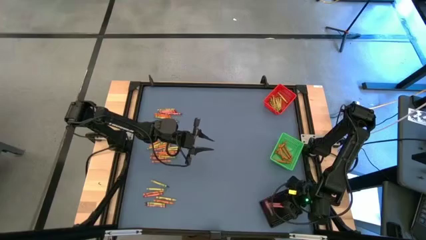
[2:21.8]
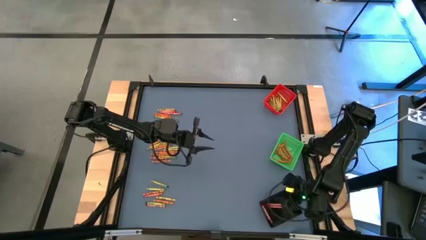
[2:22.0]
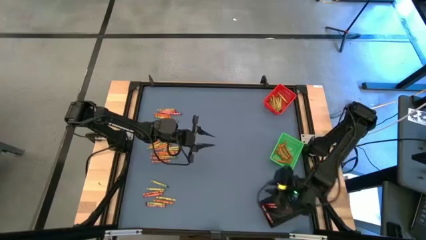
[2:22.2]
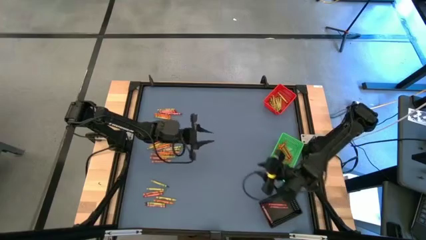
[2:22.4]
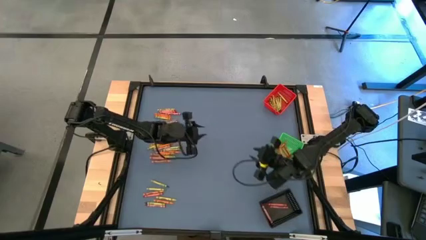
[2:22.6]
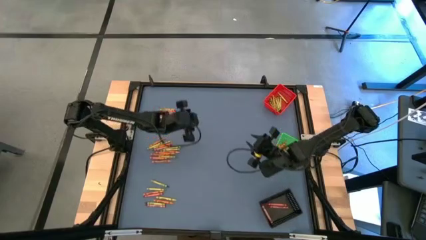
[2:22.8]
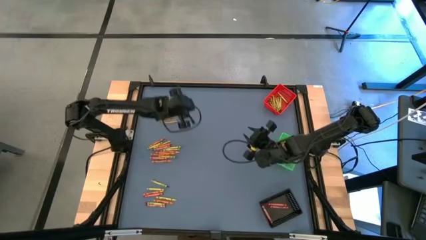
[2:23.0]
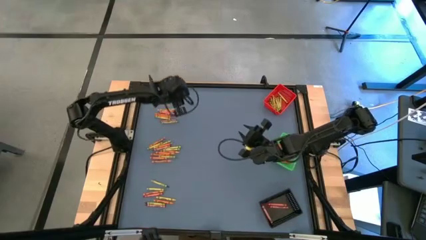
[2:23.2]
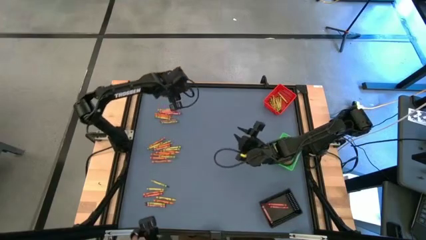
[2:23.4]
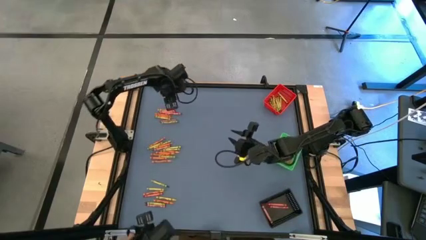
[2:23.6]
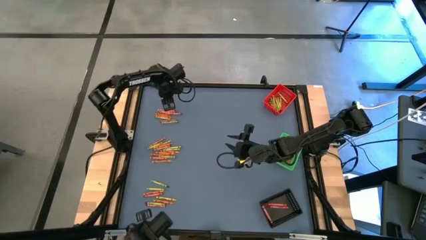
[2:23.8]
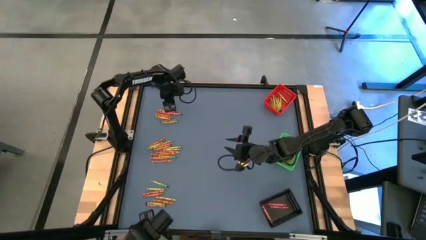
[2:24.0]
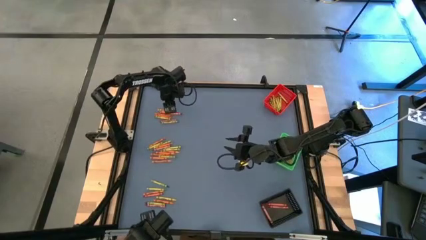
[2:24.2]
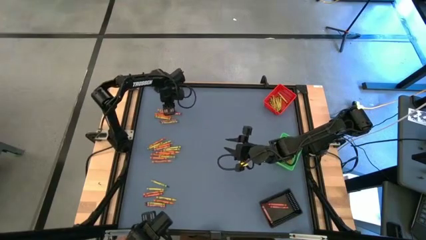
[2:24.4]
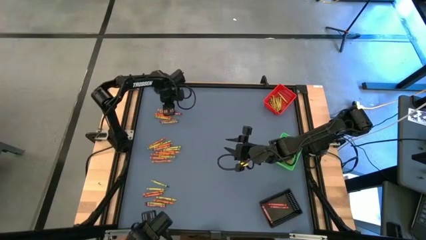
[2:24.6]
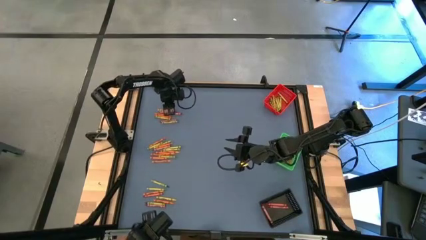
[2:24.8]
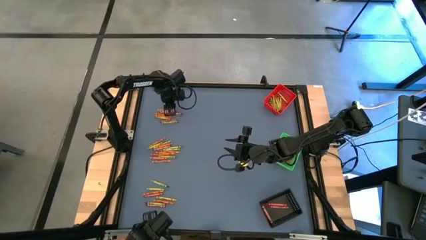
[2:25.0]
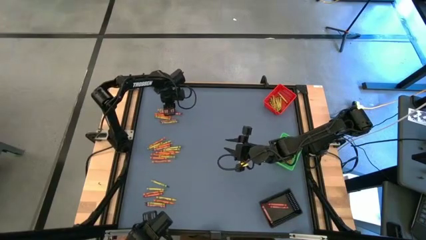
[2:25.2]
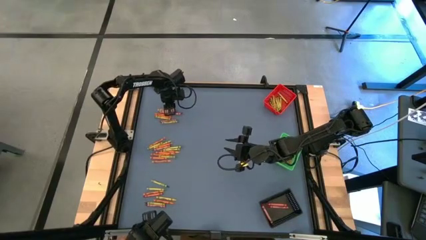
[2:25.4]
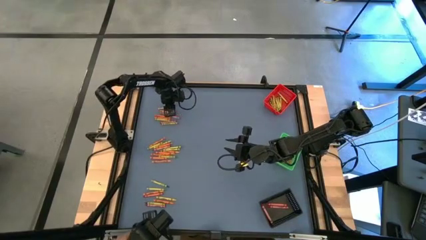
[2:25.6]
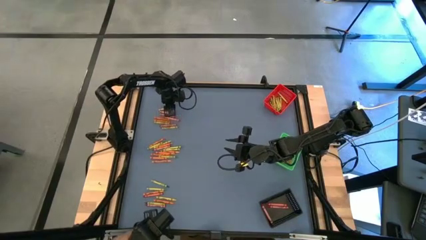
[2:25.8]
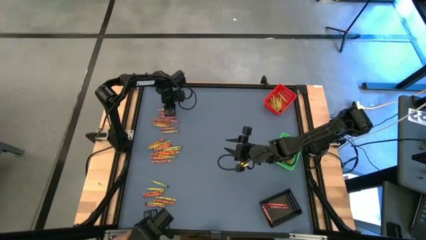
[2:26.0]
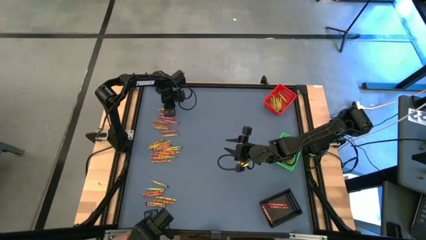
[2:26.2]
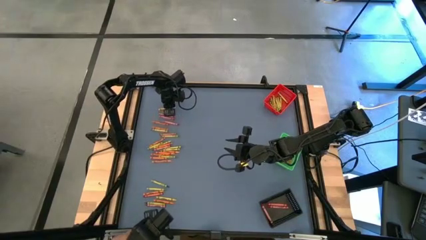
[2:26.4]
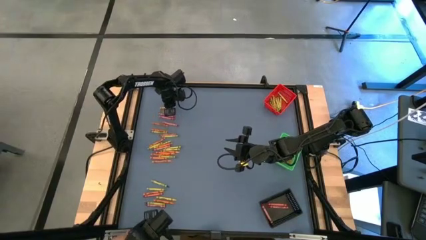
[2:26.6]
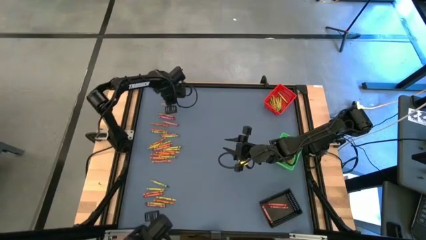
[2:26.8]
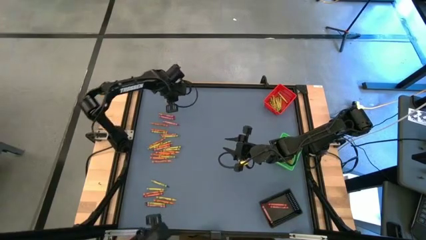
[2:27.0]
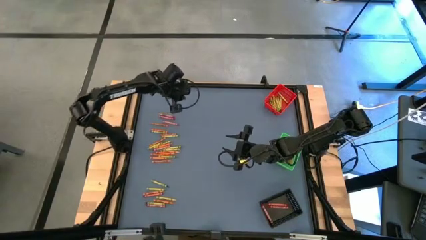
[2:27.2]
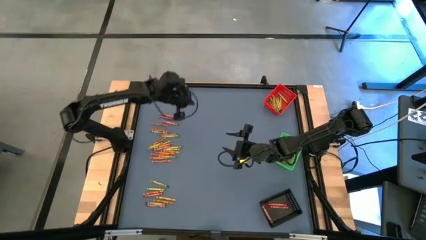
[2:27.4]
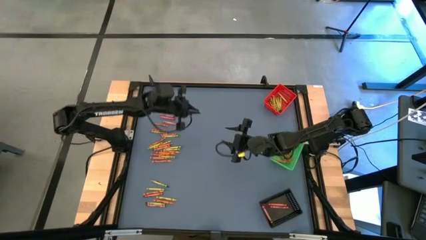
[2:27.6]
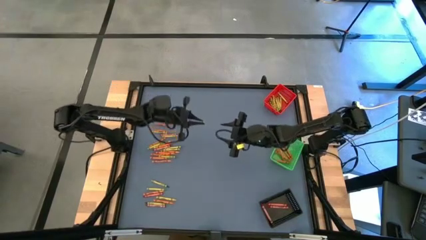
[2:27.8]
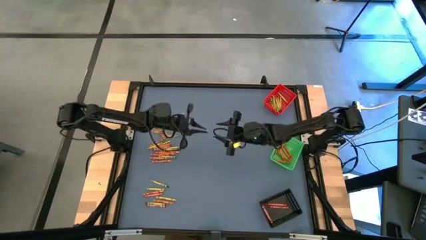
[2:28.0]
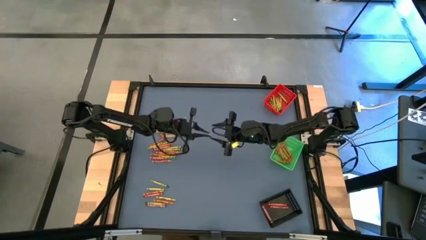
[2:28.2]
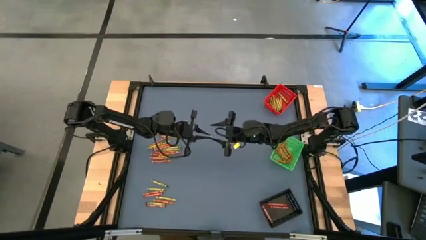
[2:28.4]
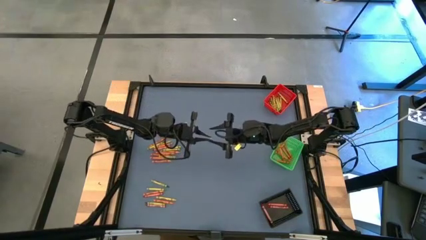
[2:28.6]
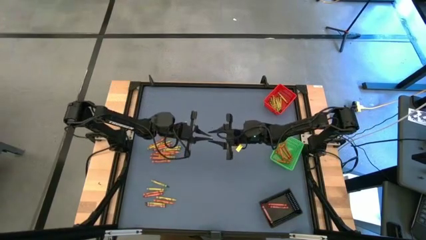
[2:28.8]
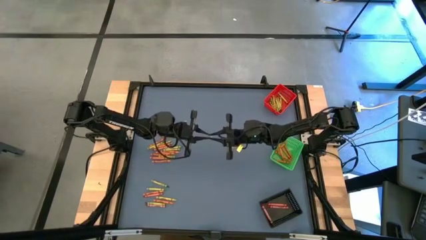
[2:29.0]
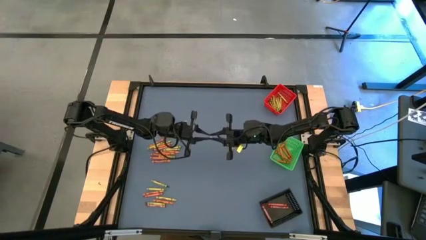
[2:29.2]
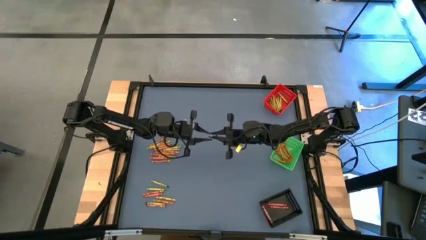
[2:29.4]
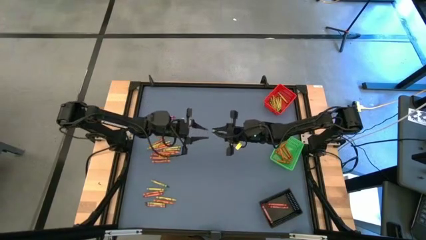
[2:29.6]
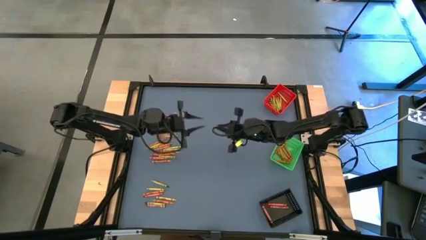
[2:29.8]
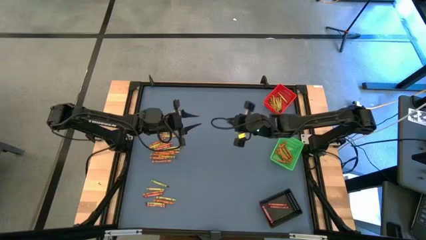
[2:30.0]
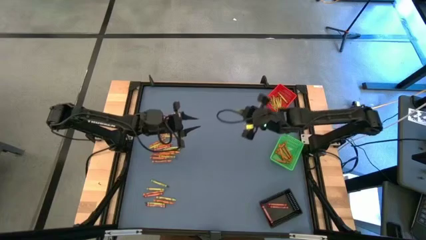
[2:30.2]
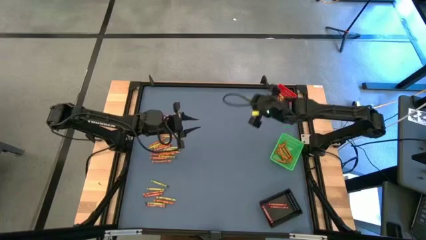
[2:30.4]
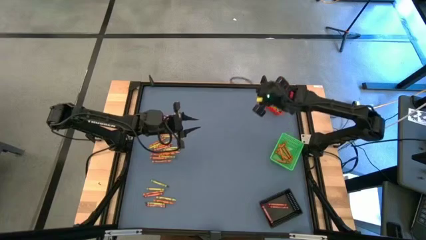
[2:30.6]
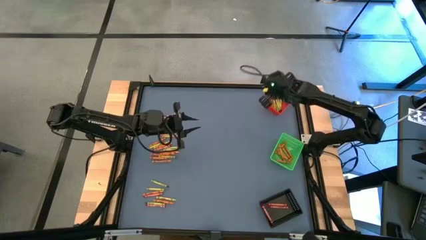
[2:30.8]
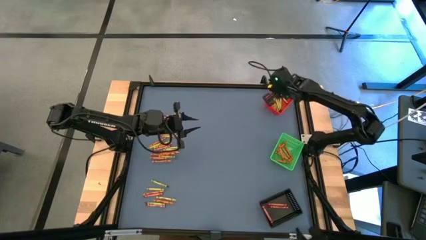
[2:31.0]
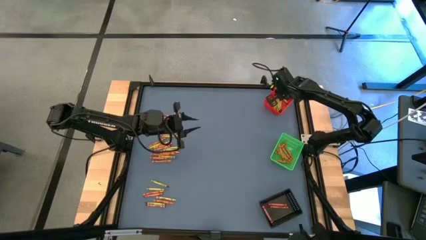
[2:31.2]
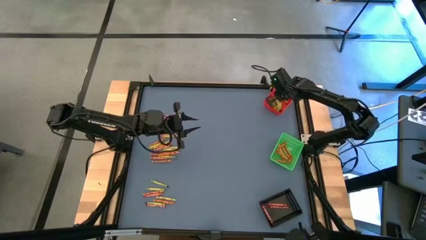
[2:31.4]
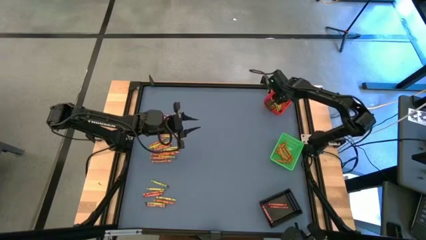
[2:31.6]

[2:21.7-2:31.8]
Task: Sort crayons
Put the light green crayon into the red bin

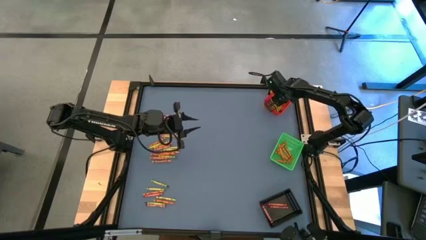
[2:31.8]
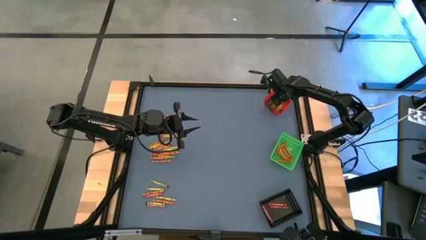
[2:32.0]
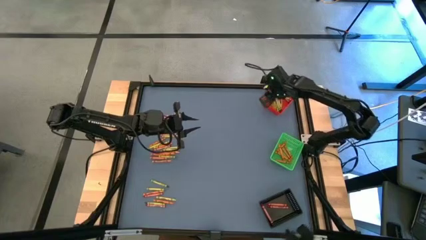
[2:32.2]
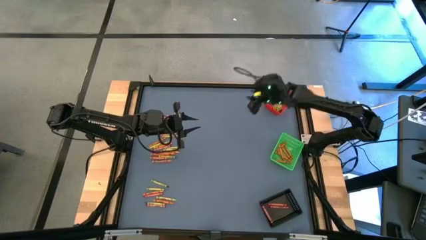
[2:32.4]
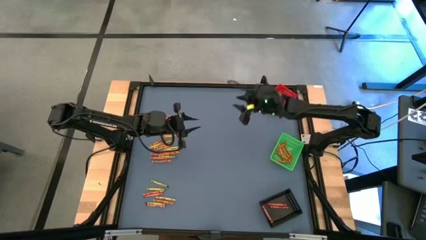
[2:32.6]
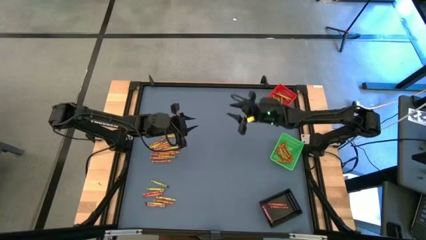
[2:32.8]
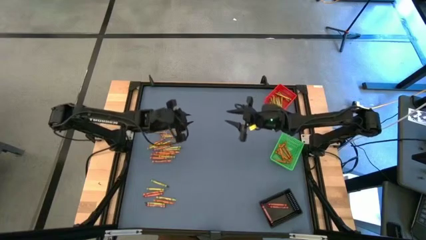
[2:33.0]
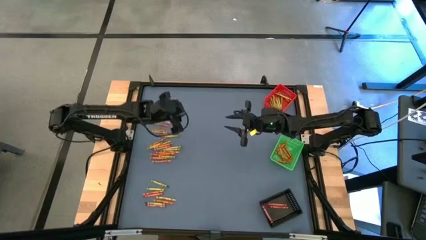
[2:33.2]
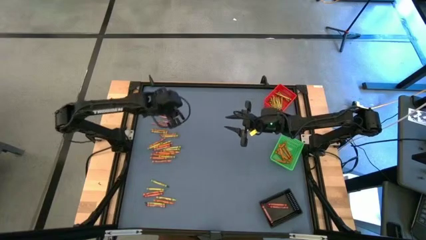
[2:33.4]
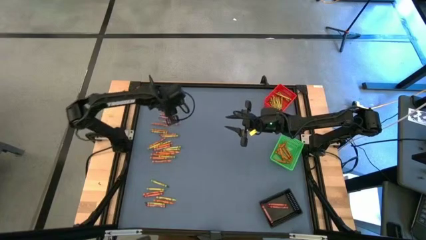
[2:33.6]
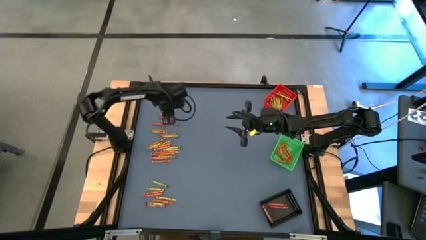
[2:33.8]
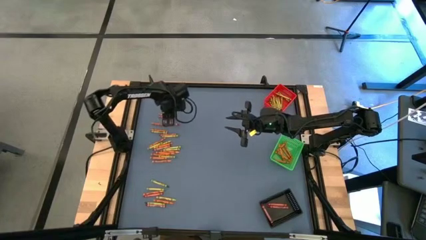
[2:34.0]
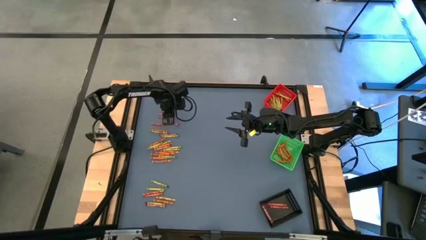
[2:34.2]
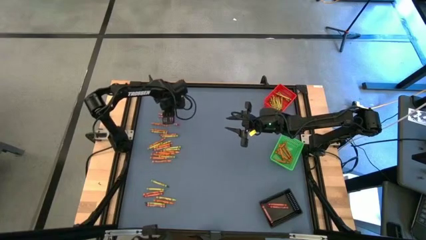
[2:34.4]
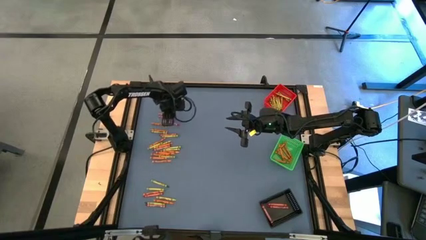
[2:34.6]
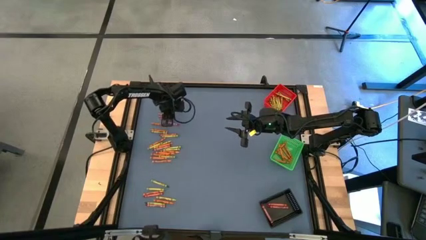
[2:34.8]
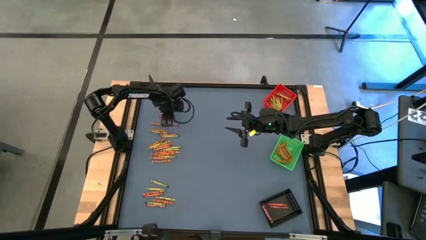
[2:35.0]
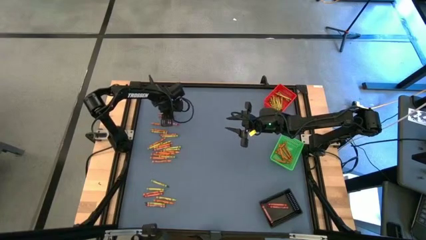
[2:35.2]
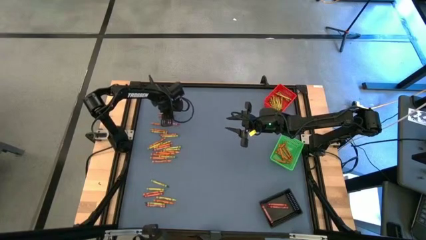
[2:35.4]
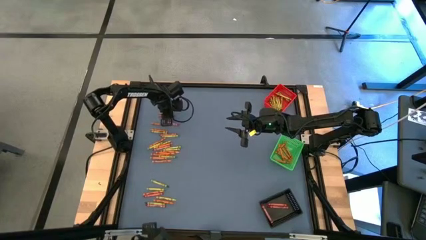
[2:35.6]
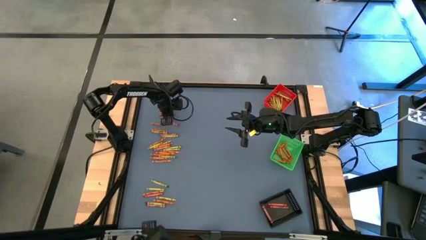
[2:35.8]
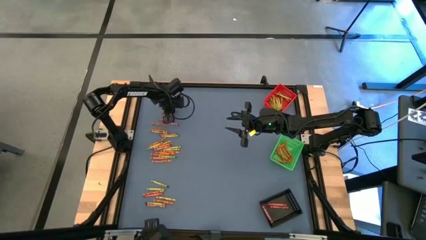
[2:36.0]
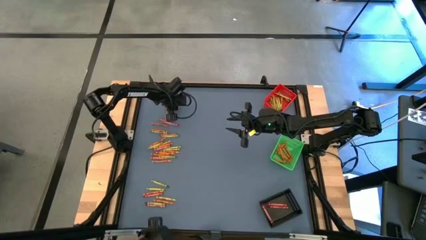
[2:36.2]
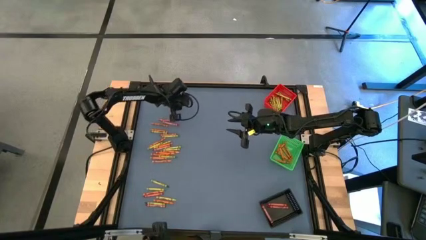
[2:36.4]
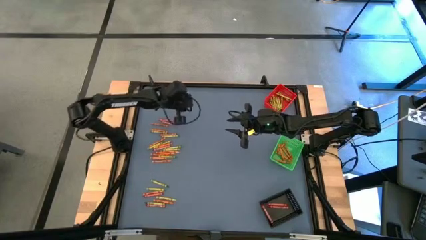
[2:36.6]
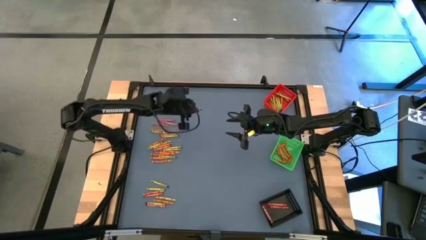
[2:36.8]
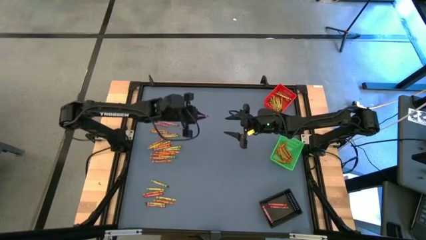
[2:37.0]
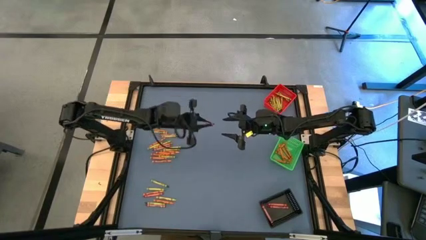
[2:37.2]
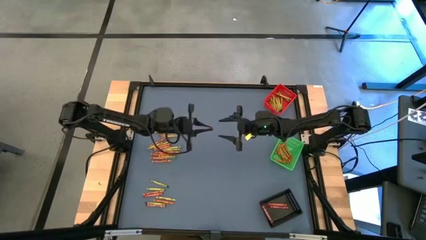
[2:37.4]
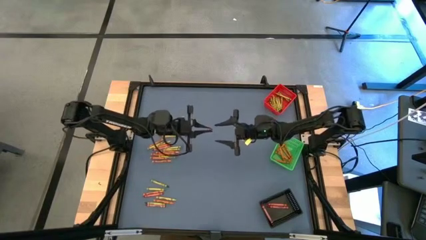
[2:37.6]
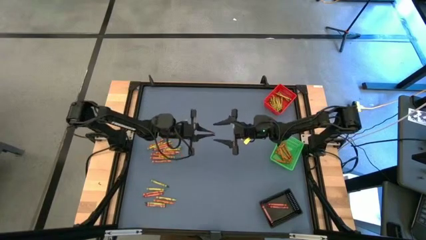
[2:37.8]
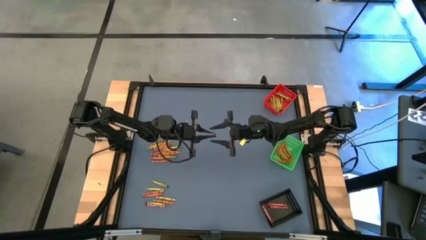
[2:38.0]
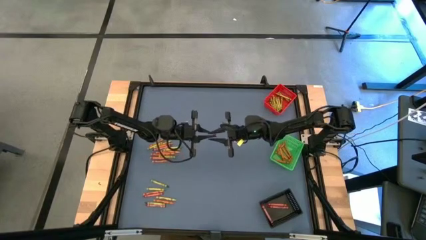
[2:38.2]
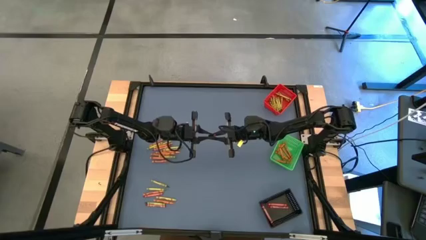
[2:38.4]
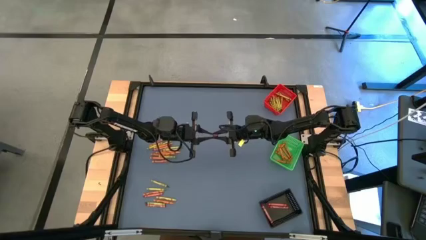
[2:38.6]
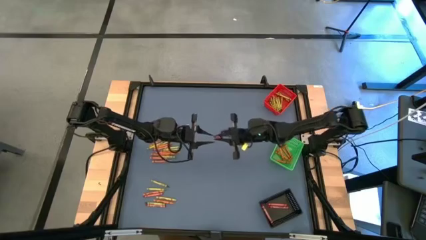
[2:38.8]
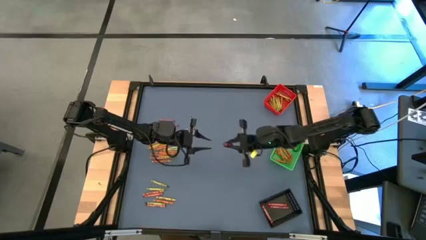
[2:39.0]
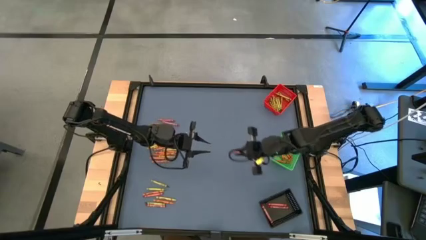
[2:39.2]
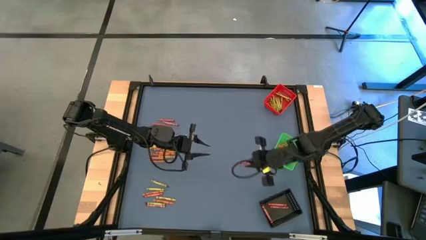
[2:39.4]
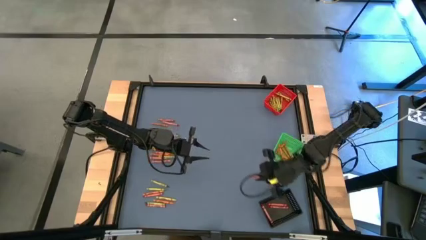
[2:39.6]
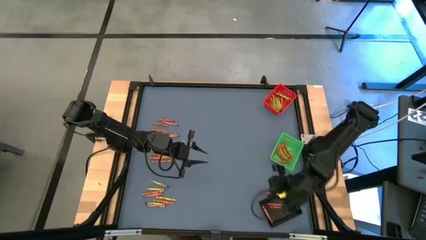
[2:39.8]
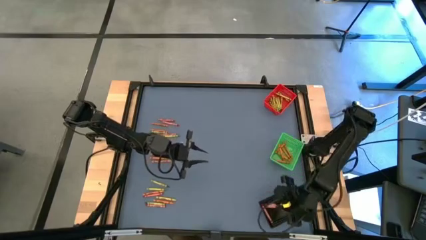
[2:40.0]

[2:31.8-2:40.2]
Put the red crayon into the black bin
